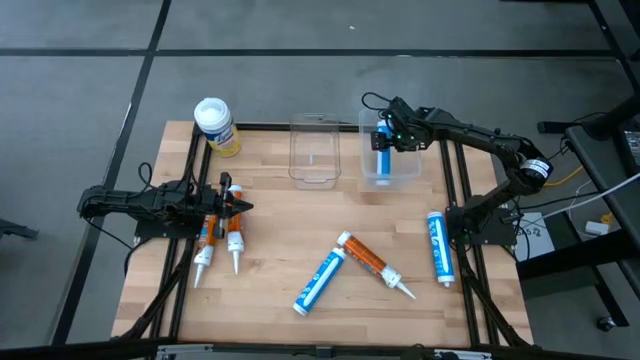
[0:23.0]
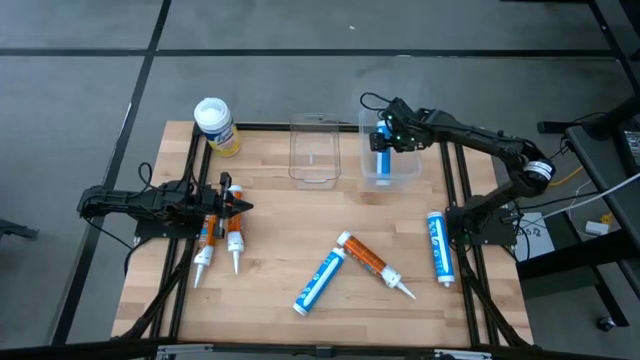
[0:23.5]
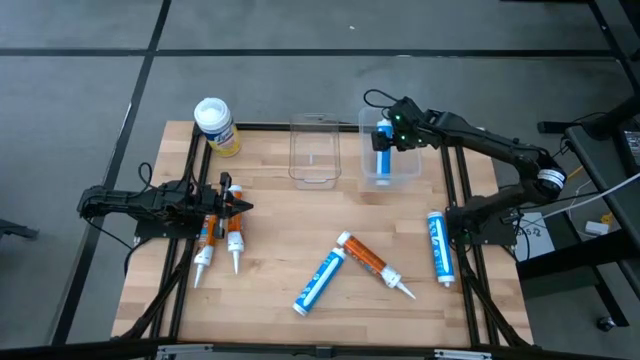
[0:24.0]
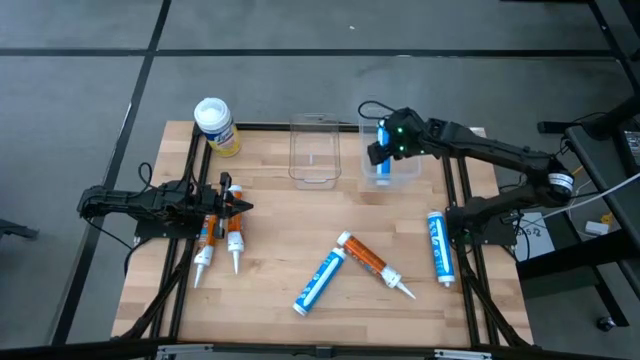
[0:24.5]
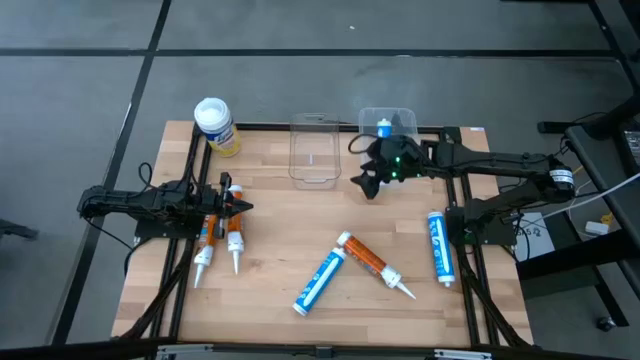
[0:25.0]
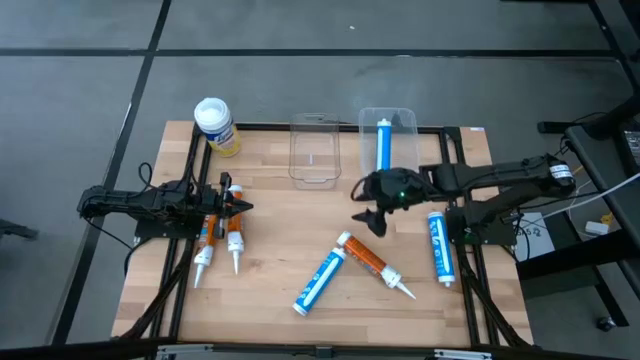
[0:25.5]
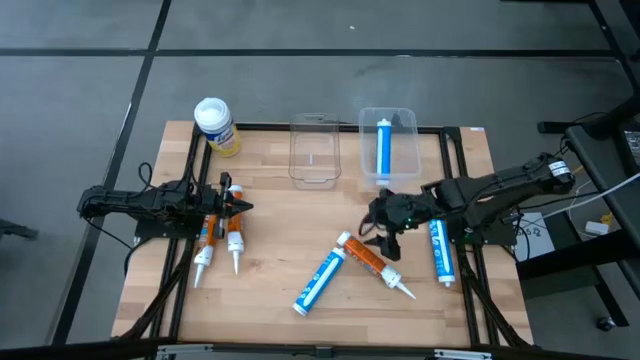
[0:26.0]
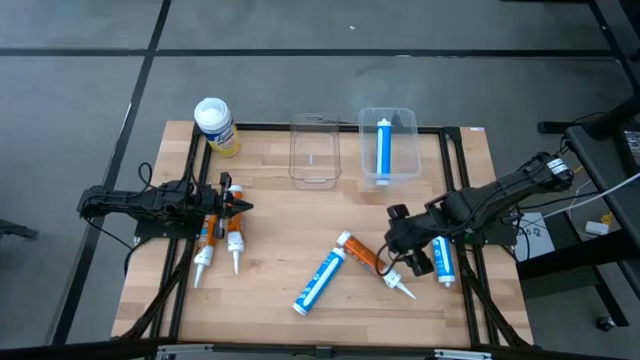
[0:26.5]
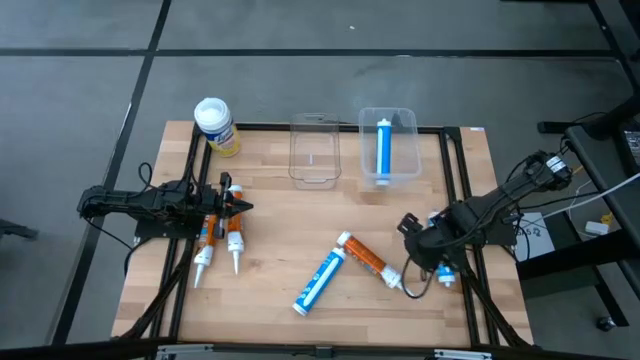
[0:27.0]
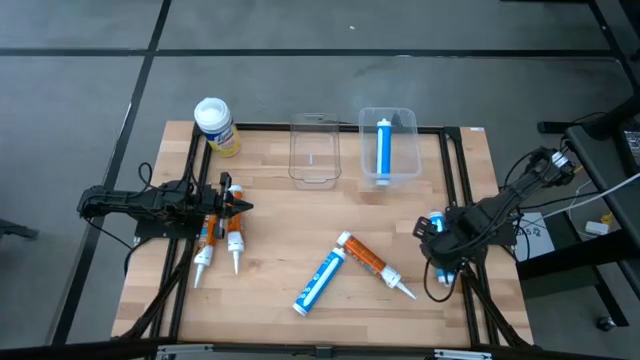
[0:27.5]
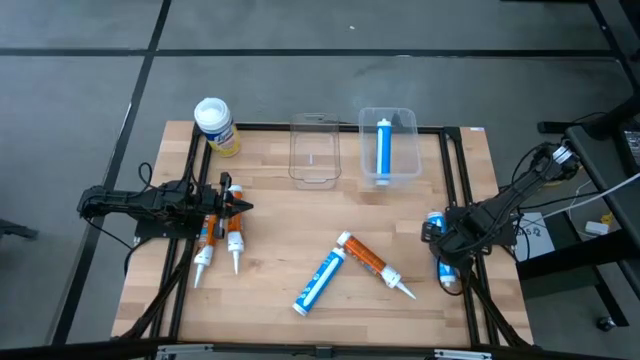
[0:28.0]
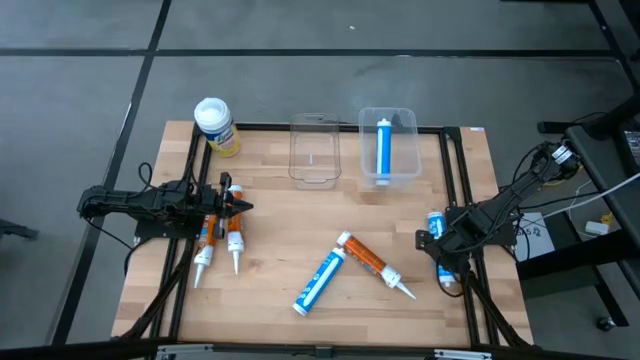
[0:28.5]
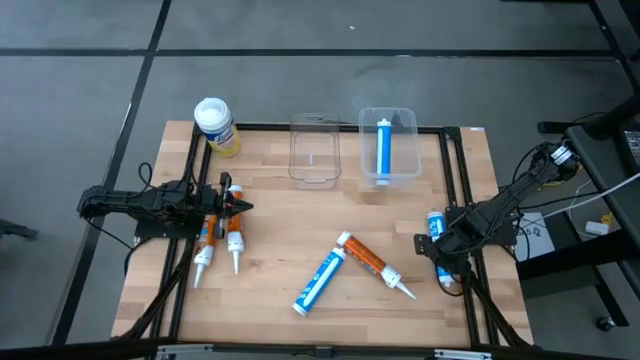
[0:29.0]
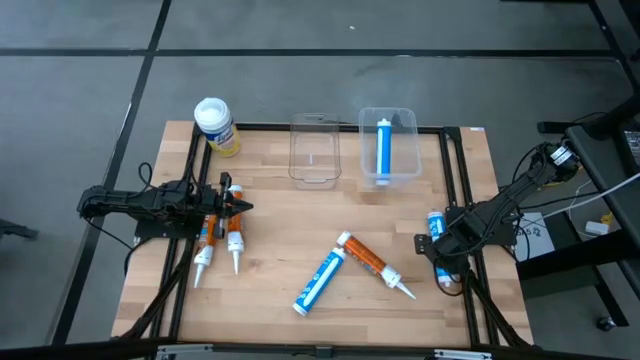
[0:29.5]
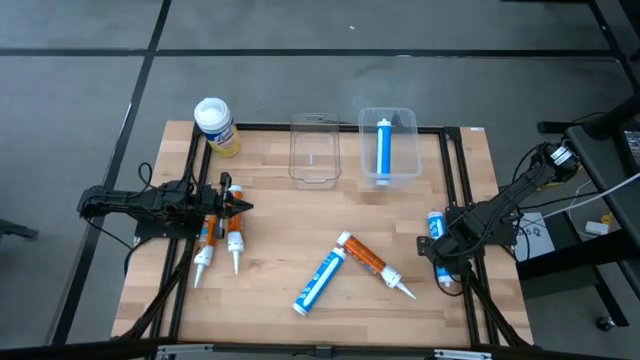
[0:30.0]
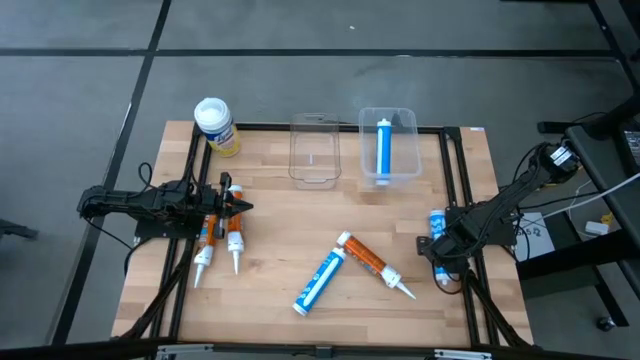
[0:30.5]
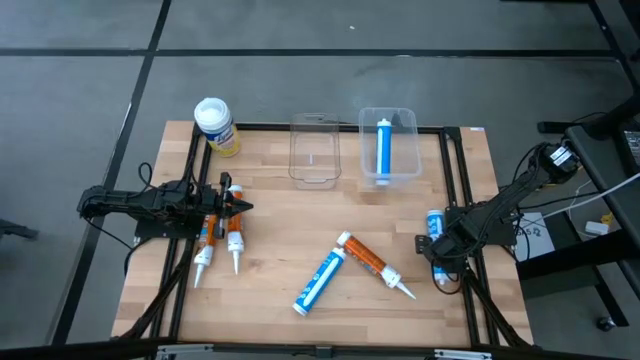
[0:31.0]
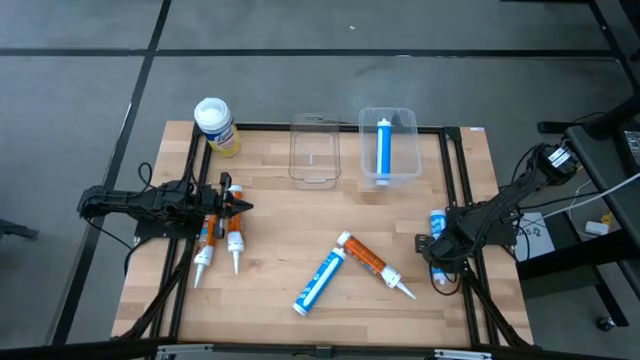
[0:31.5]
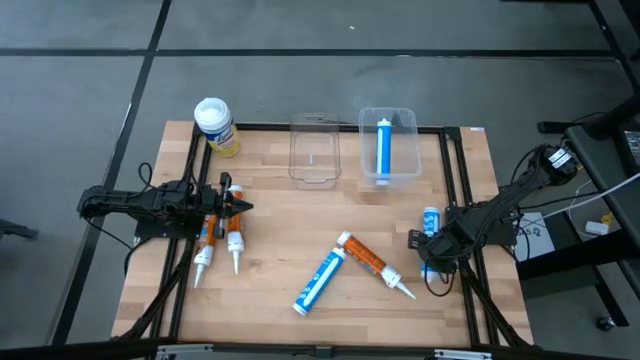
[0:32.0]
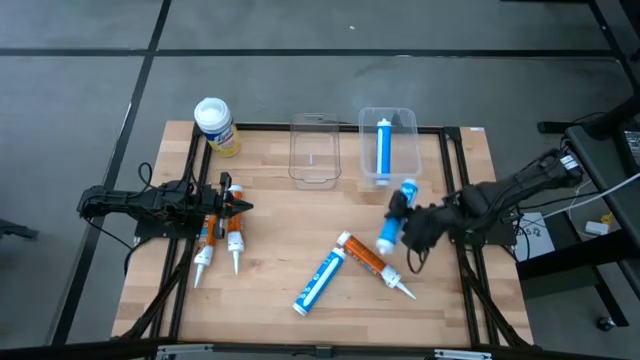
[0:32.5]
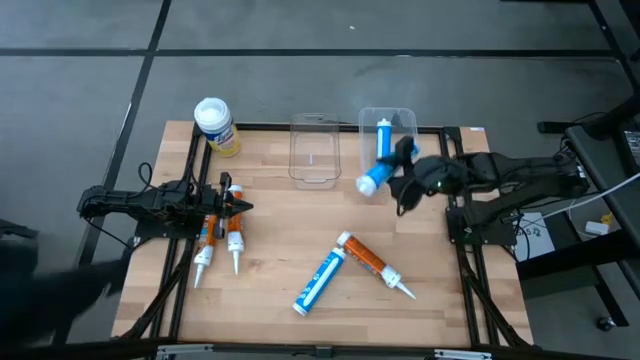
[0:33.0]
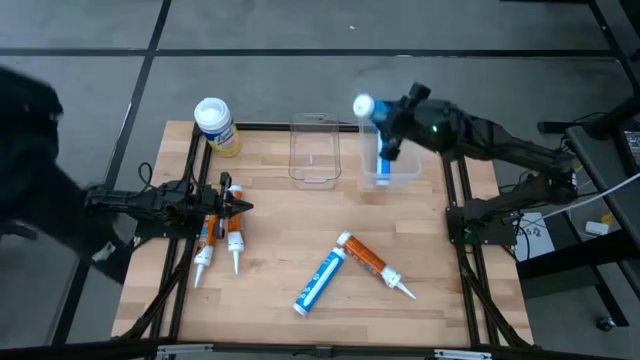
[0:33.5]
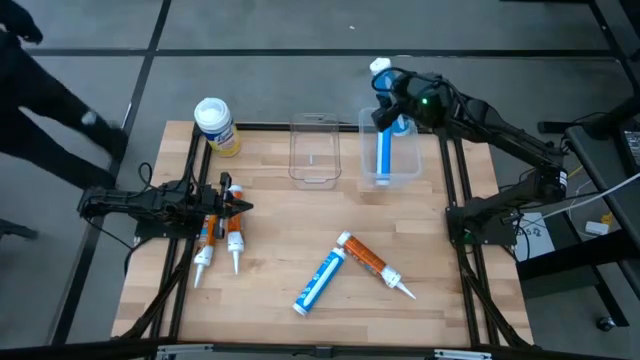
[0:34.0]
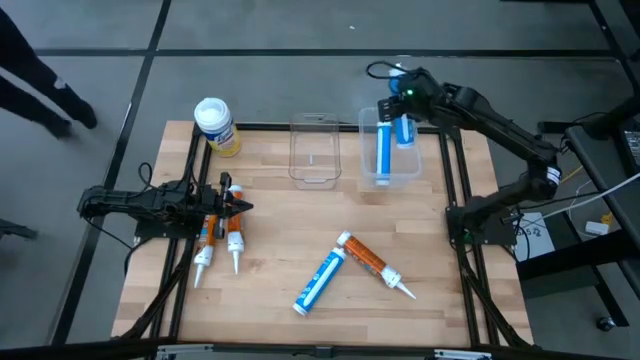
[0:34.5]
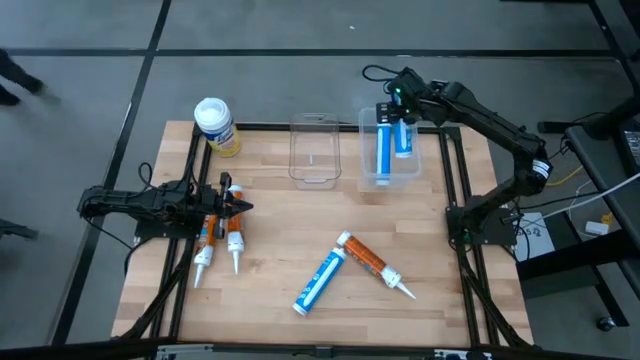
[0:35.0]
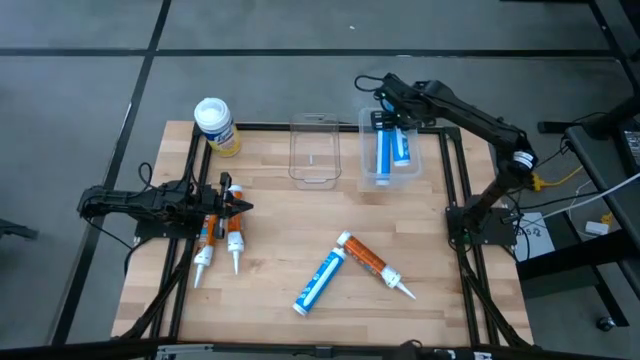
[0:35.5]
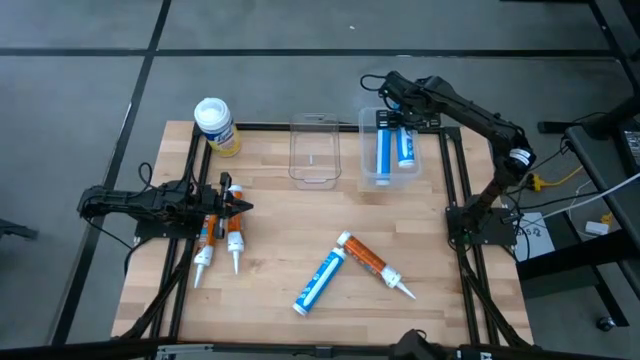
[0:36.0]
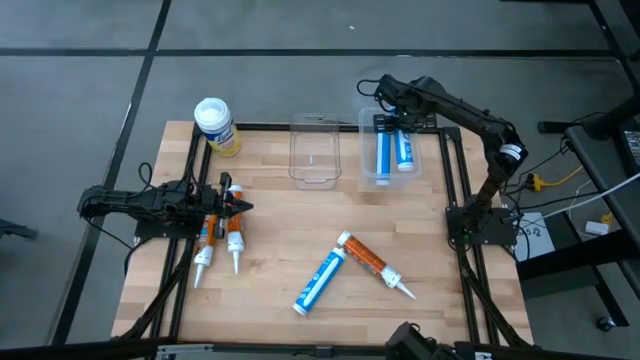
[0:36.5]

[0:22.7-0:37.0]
Task: Pick & place silicon tubes, Sealant and Lysol wipes
Put the right blue sealant into the right transparent bin

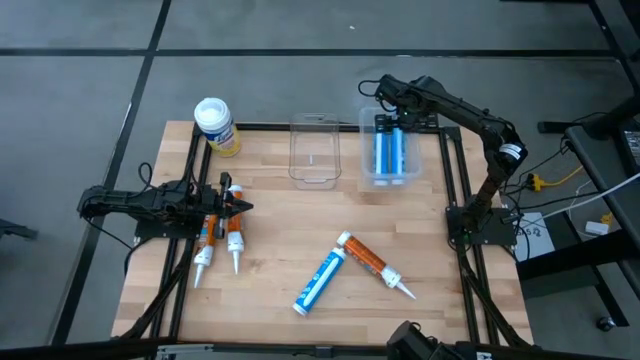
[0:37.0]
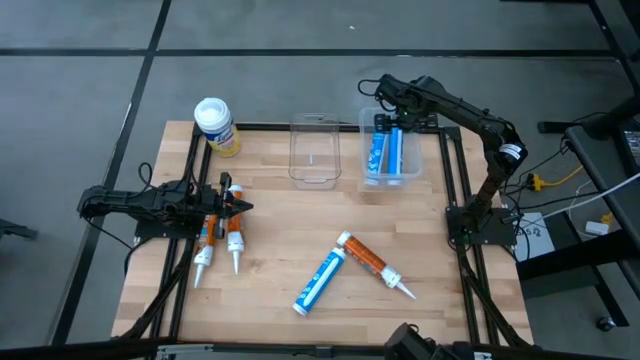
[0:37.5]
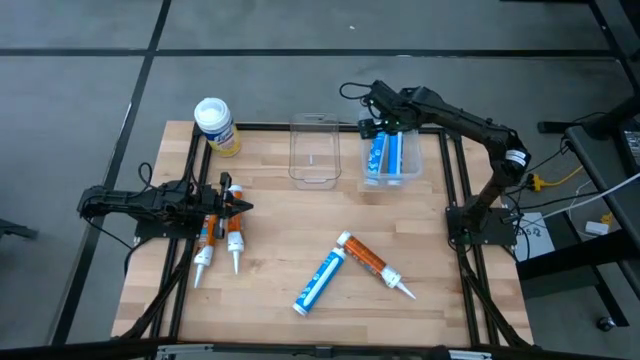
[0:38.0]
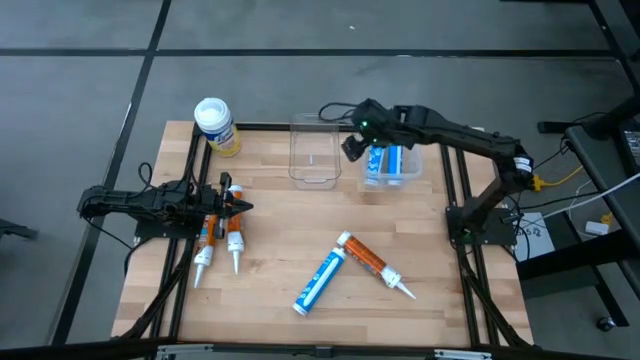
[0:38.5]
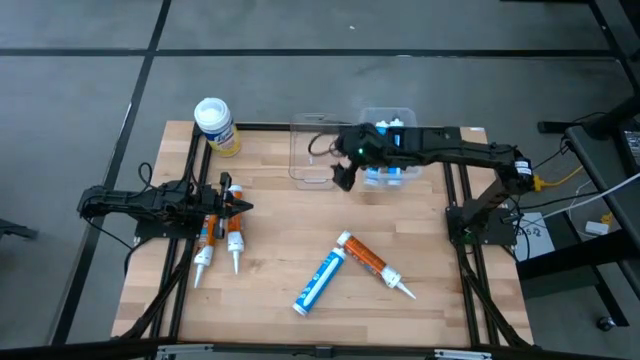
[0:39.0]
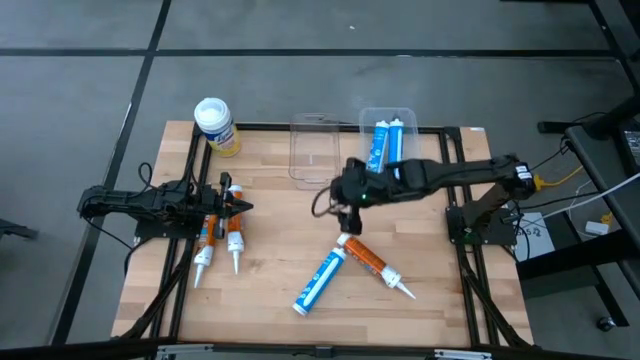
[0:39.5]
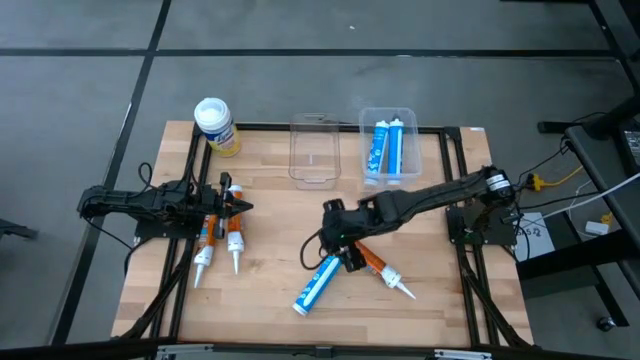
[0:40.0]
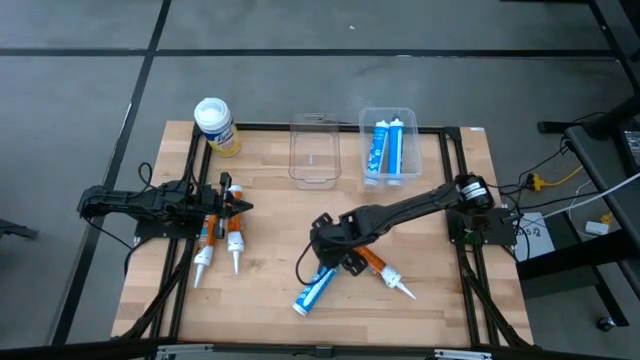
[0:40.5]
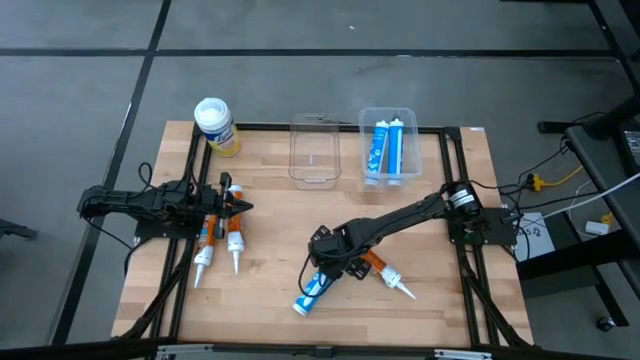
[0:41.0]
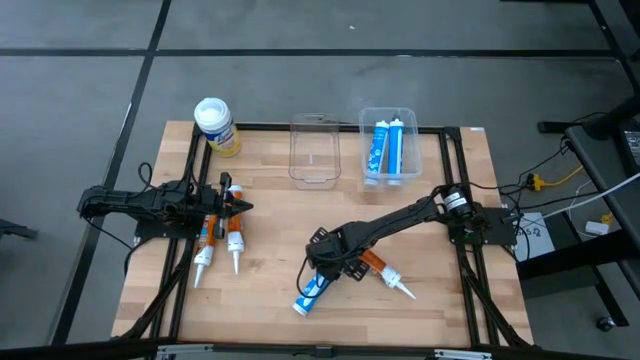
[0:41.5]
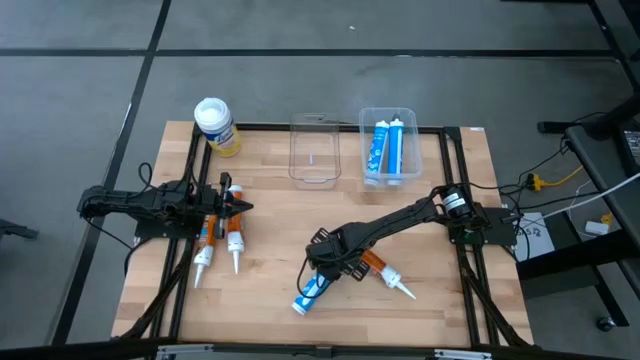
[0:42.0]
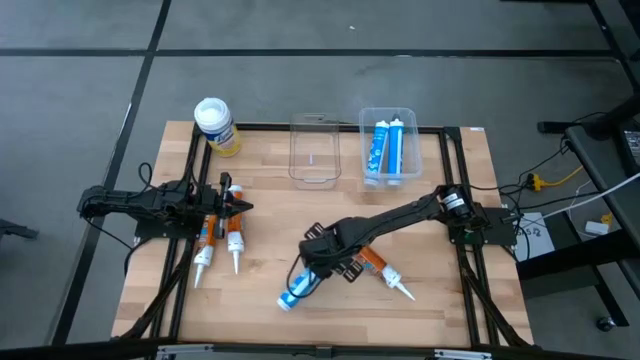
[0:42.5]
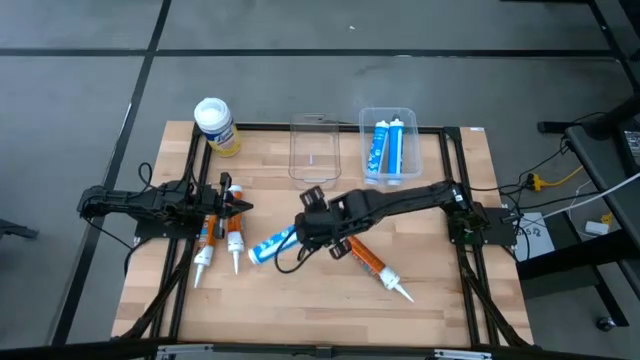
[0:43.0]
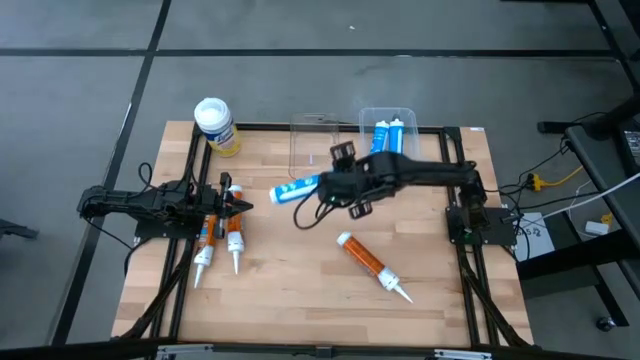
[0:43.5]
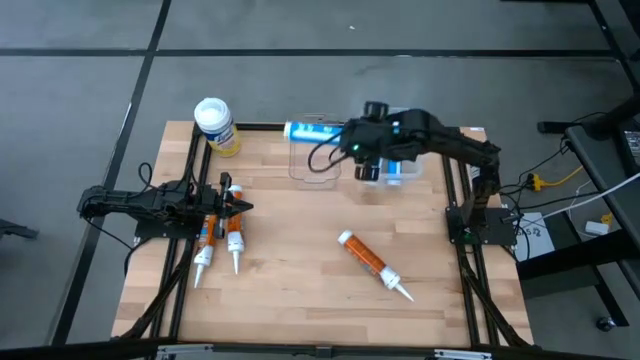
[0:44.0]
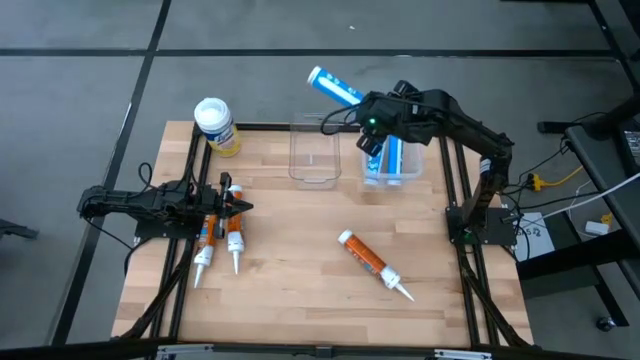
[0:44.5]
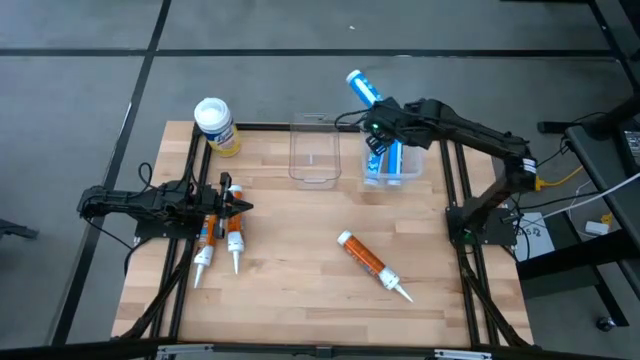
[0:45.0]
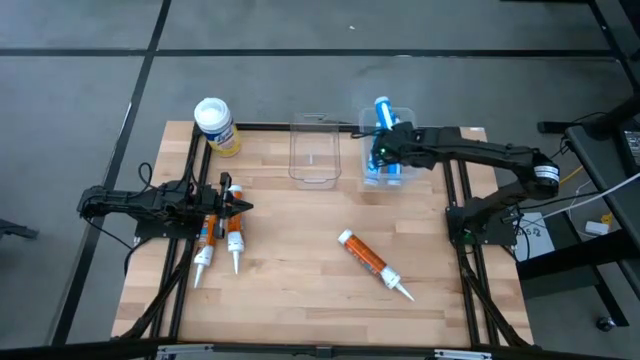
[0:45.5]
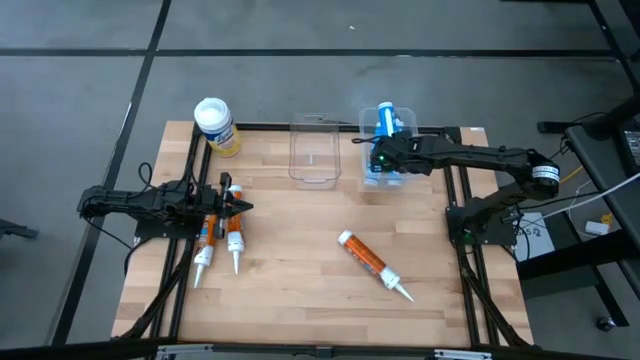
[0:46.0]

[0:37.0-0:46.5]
Put the blue sealant into the right transparent bin
